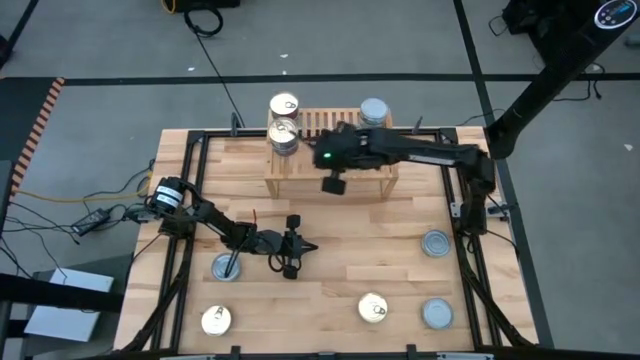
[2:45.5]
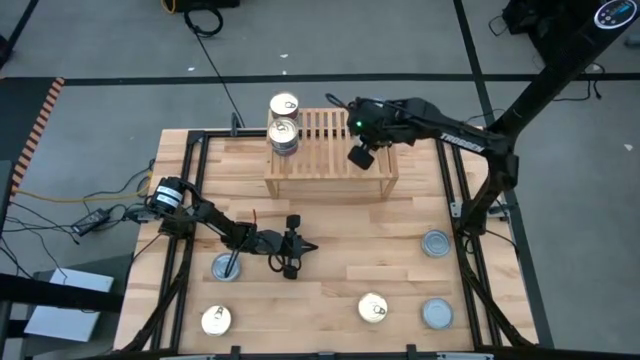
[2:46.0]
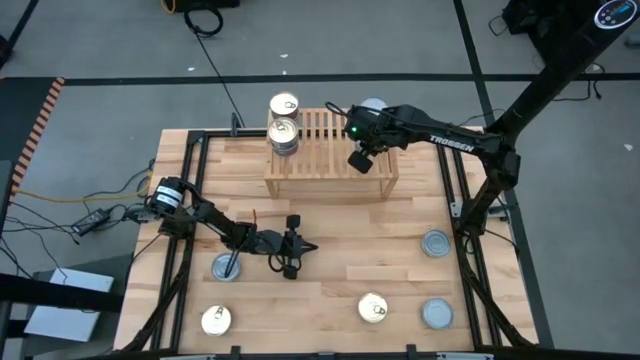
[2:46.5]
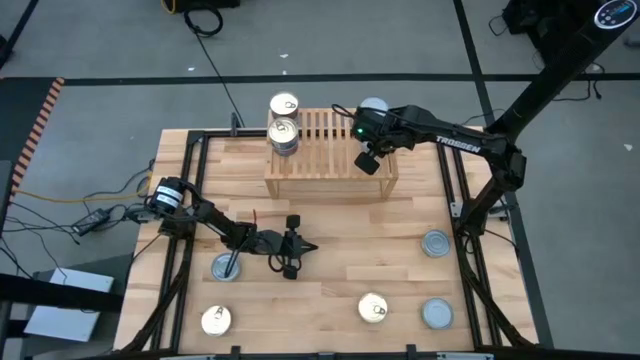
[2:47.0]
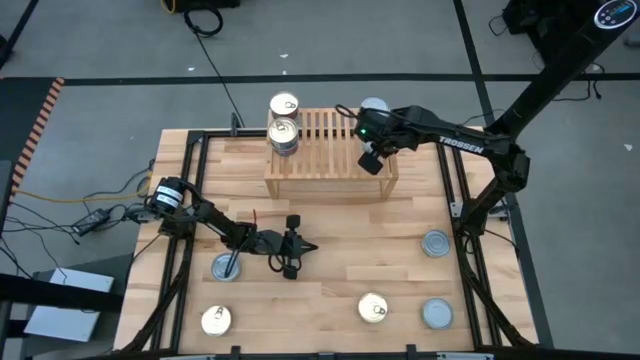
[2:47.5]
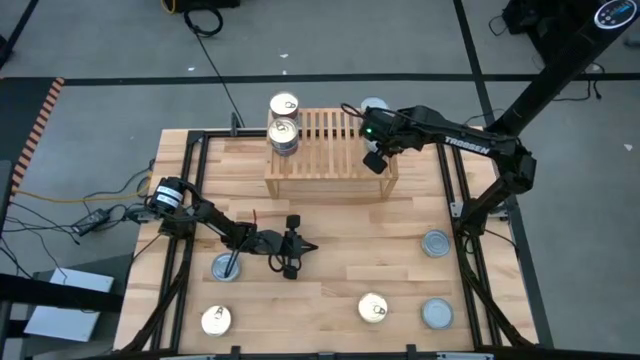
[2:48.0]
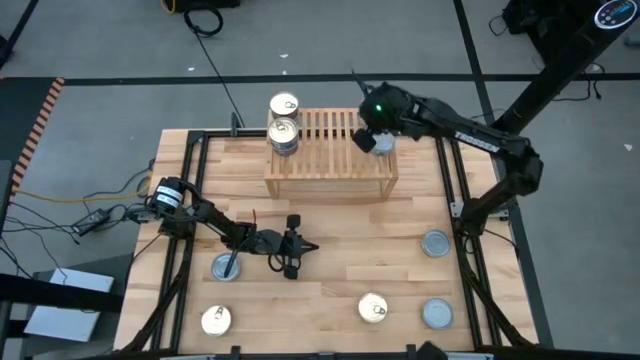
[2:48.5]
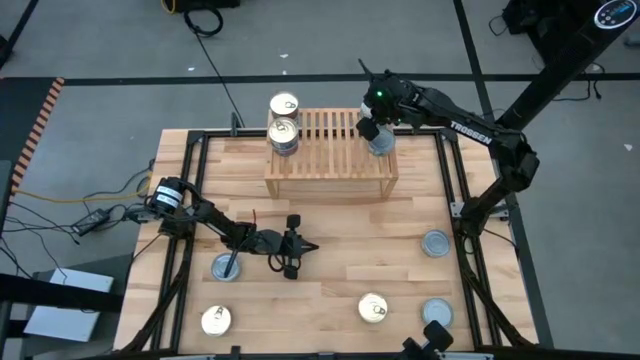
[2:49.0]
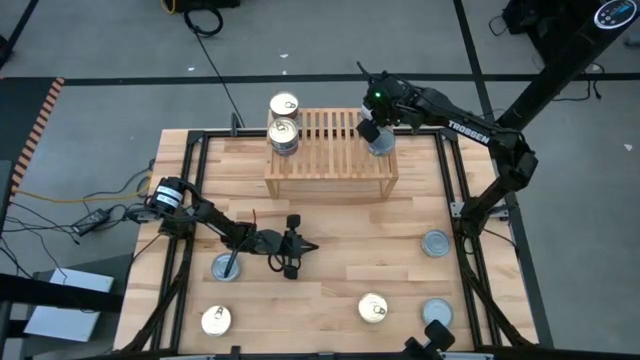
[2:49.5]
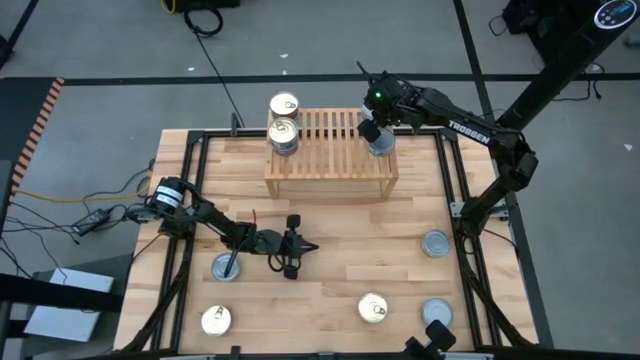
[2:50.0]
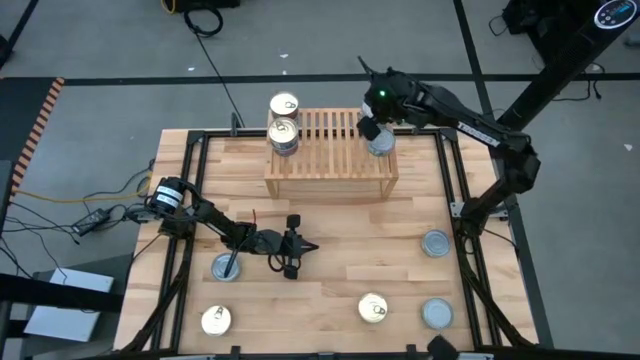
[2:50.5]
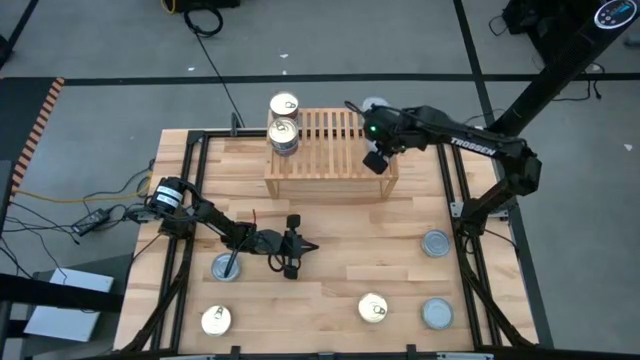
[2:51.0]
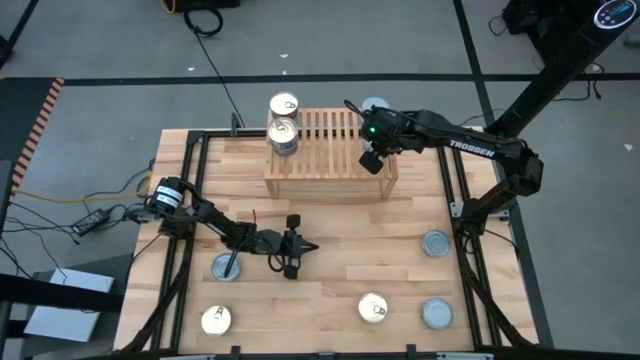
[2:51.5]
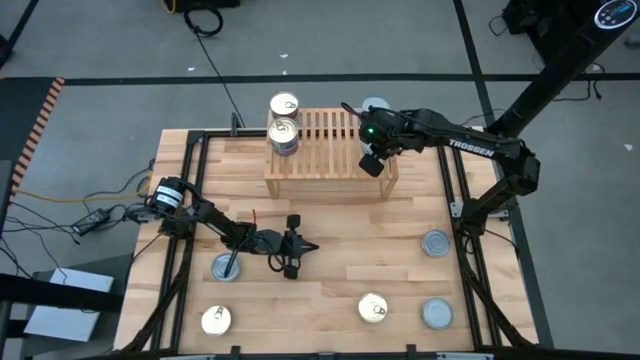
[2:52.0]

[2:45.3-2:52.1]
Task: Stack canned seafood by type on shelf
Adjust the green tuna cans on the shelf

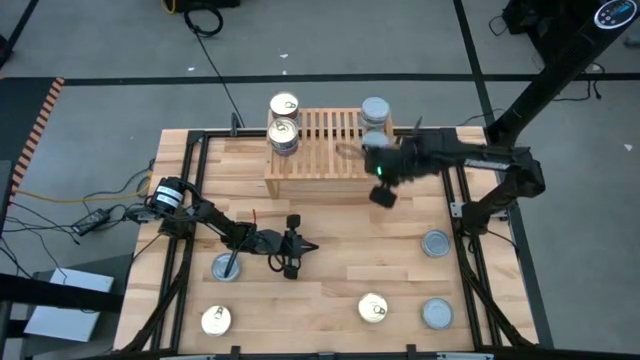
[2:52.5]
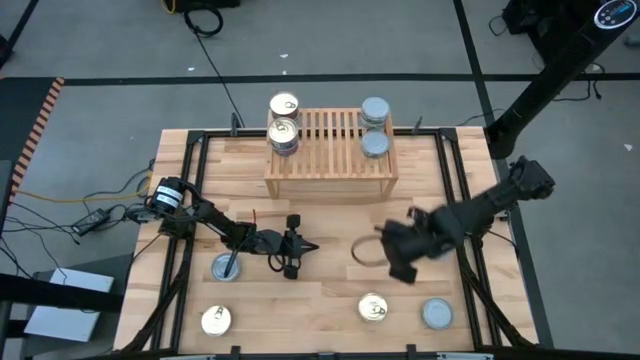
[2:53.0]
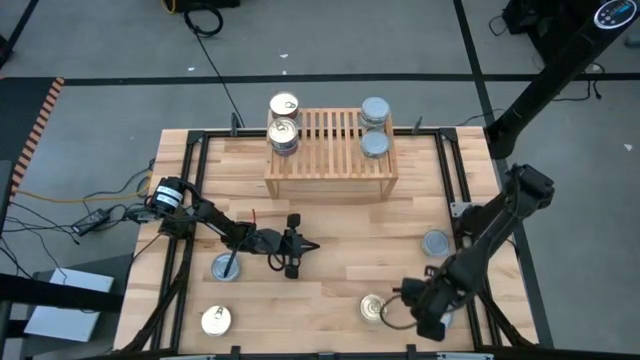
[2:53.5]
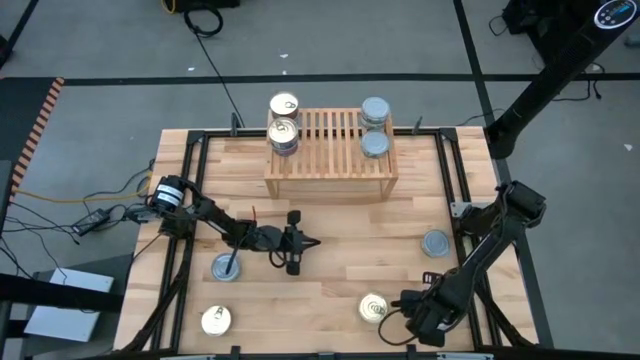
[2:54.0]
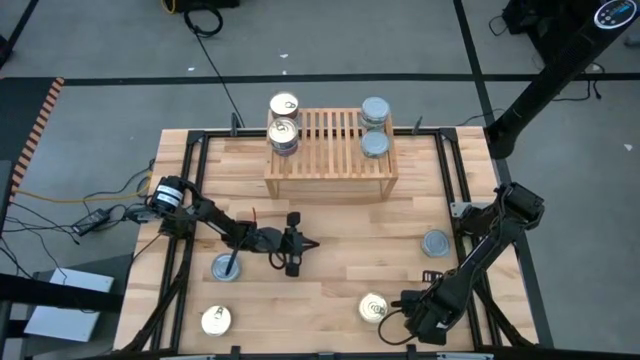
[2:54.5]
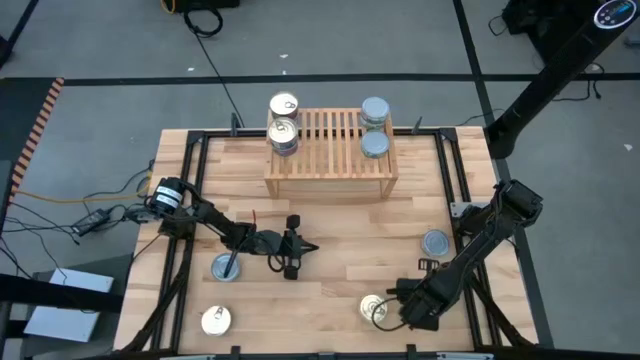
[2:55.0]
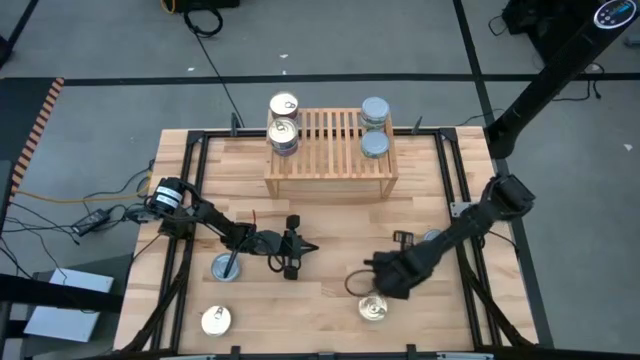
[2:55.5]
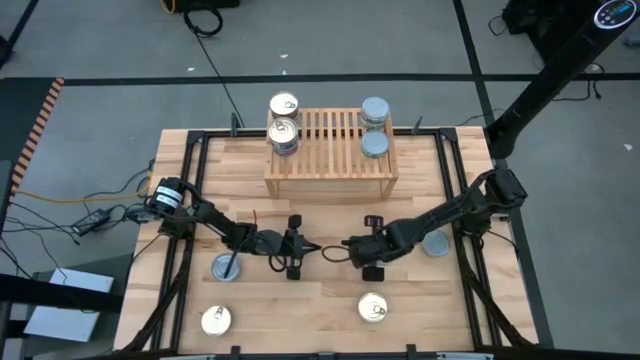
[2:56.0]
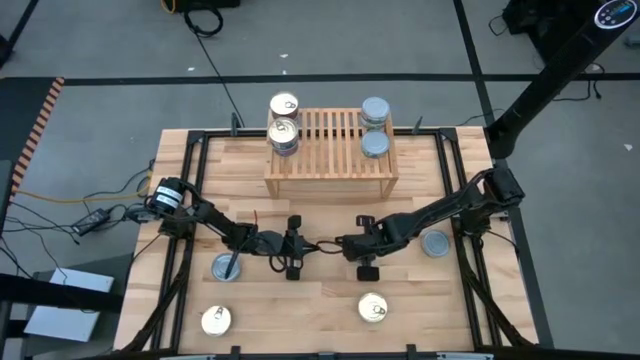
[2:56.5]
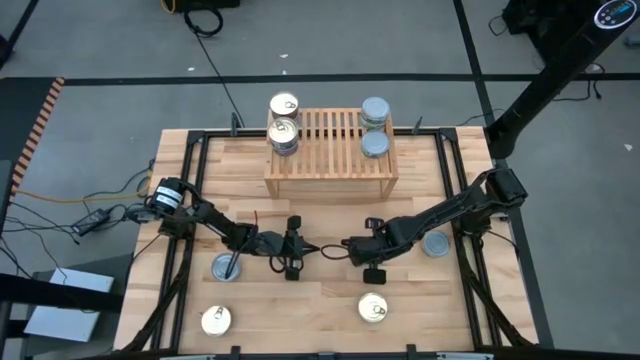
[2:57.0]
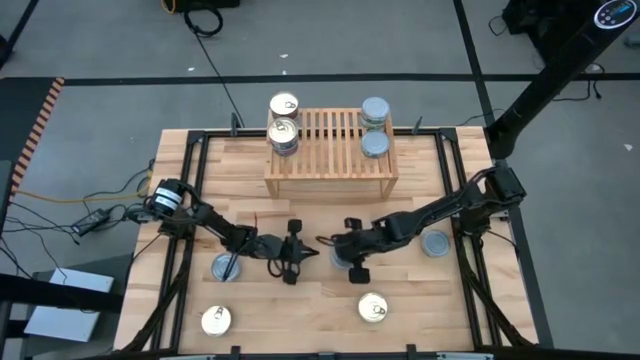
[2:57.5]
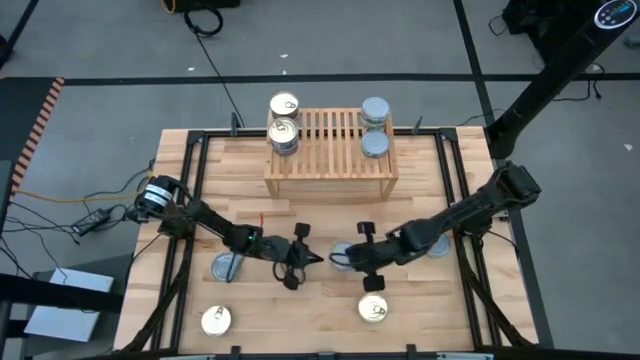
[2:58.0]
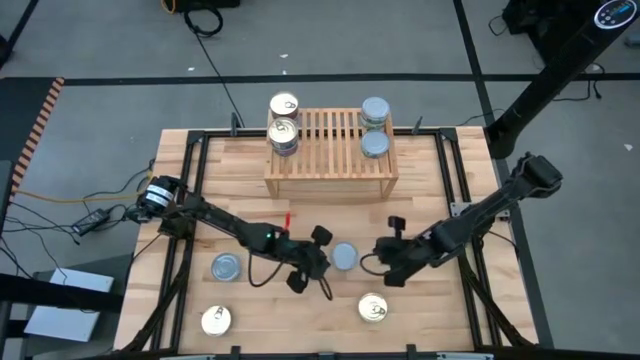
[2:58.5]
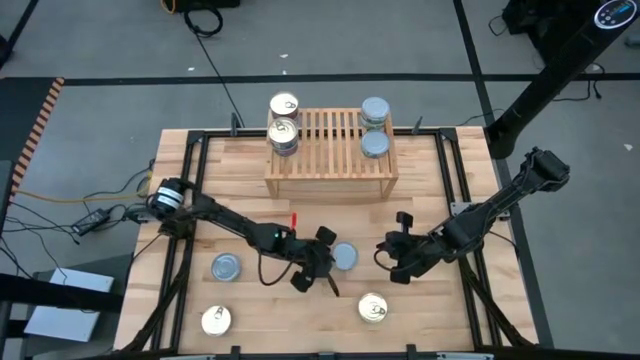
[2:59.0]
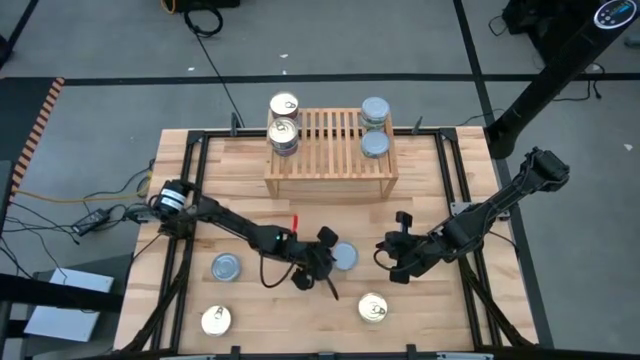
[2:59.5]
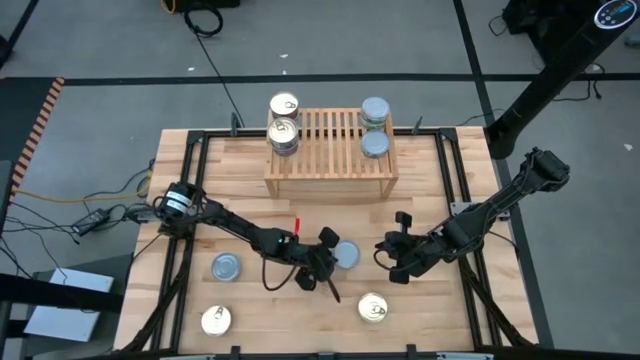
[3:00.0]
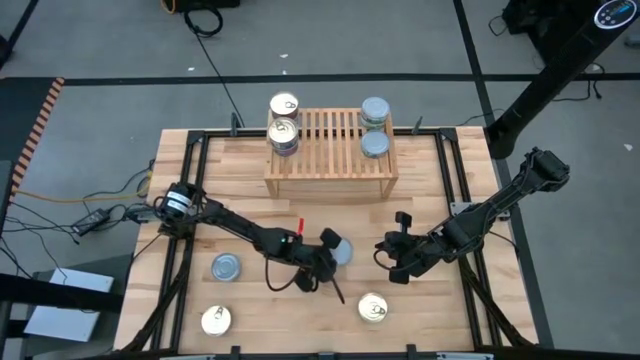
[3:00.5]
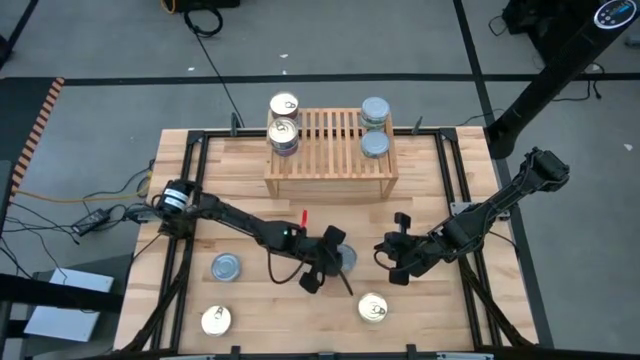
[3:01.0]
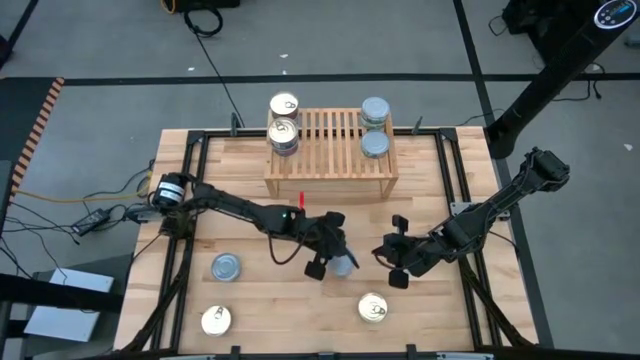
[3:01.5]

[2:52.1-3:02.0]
Stack the green tuna can on the green tuna can on the shelf
